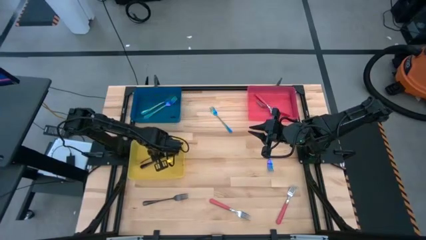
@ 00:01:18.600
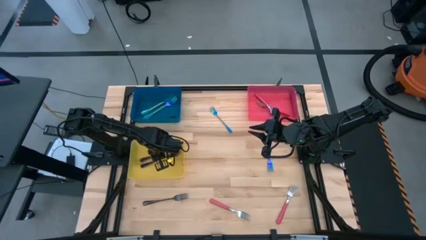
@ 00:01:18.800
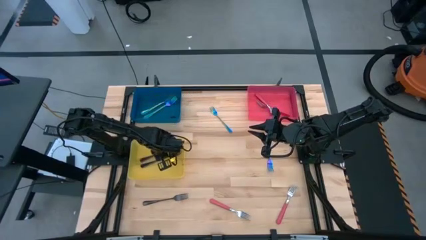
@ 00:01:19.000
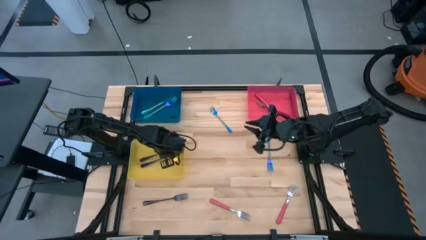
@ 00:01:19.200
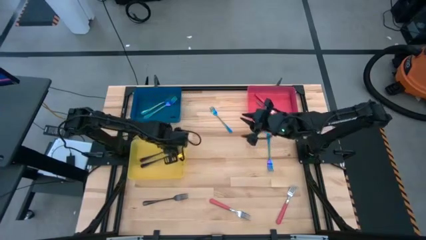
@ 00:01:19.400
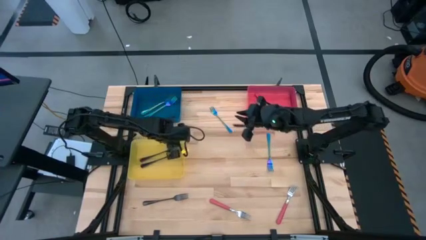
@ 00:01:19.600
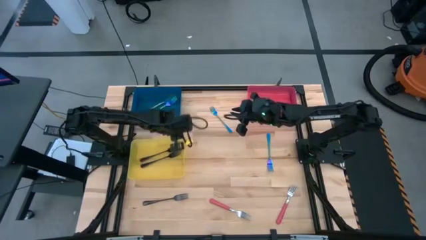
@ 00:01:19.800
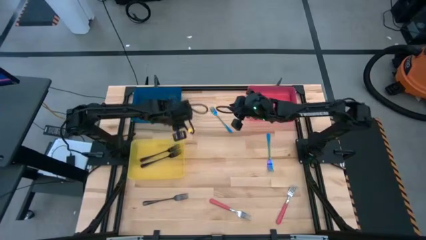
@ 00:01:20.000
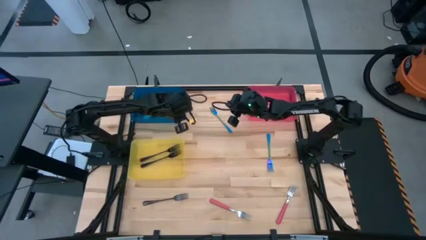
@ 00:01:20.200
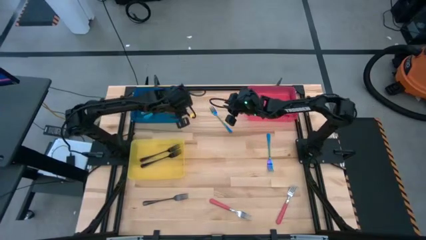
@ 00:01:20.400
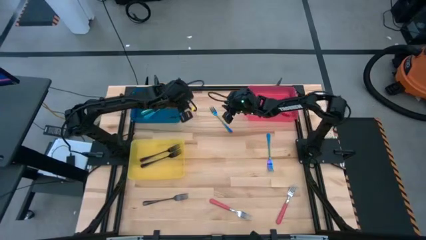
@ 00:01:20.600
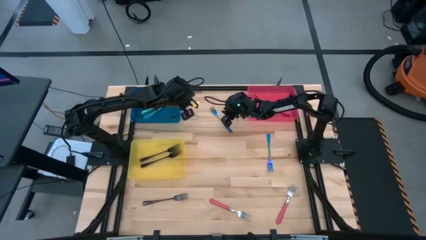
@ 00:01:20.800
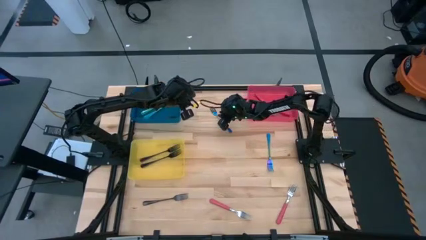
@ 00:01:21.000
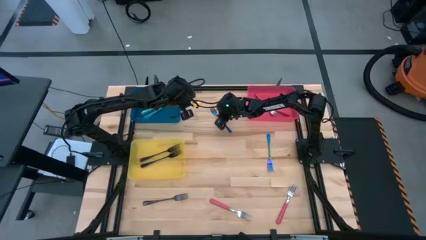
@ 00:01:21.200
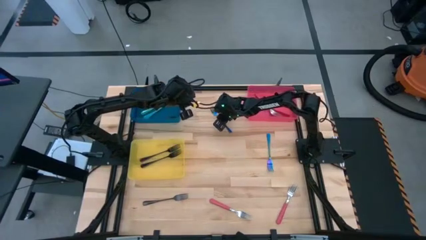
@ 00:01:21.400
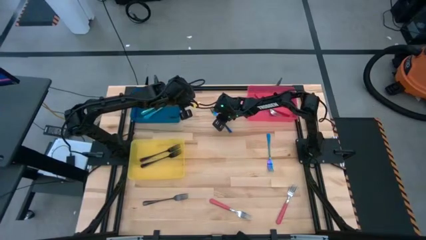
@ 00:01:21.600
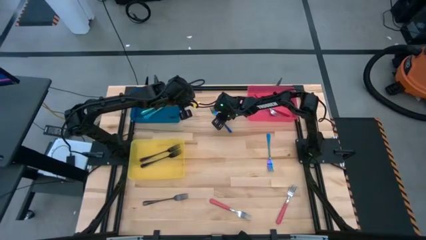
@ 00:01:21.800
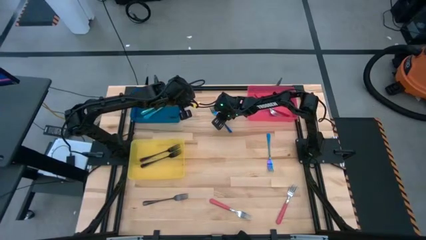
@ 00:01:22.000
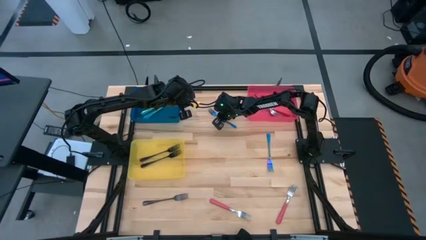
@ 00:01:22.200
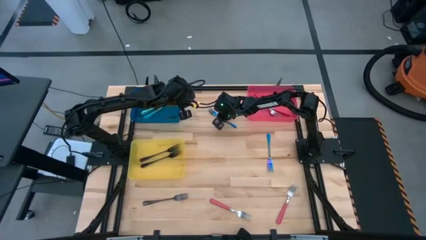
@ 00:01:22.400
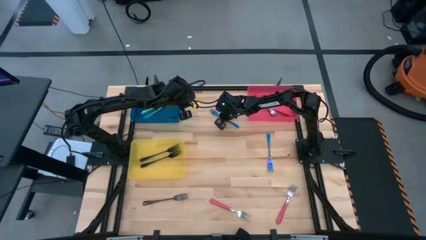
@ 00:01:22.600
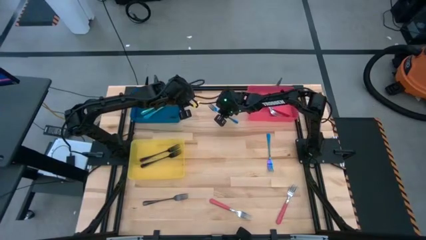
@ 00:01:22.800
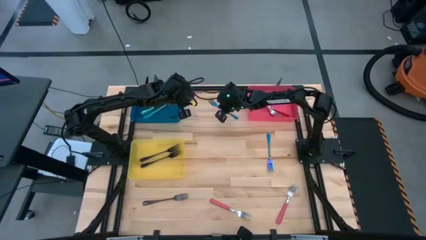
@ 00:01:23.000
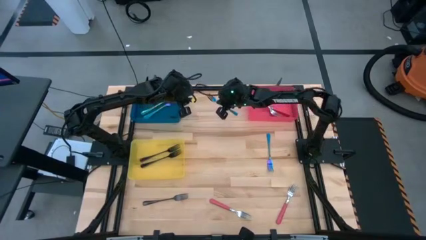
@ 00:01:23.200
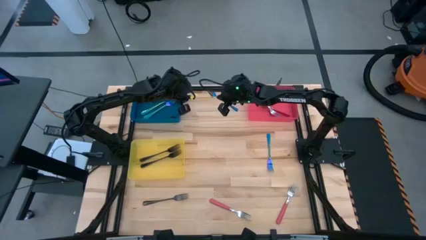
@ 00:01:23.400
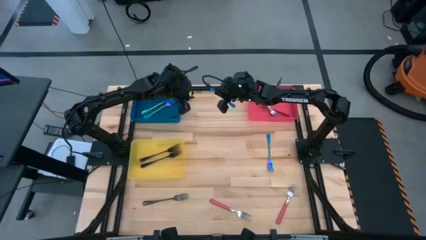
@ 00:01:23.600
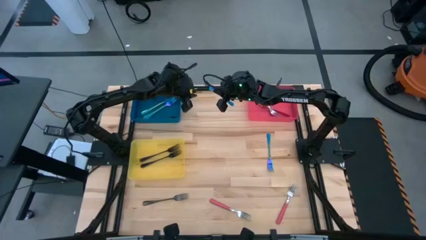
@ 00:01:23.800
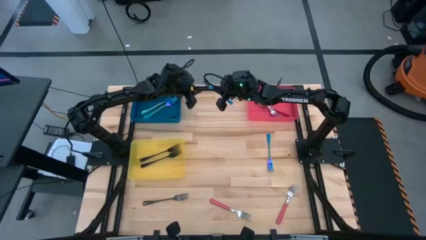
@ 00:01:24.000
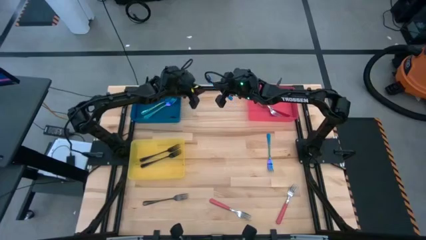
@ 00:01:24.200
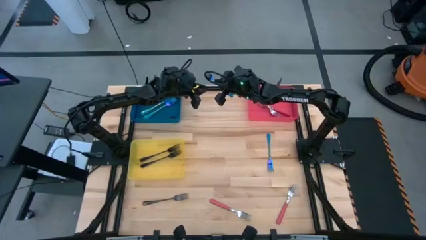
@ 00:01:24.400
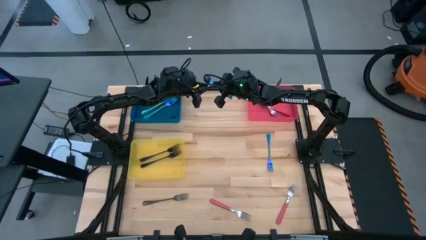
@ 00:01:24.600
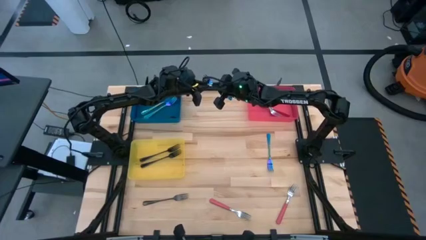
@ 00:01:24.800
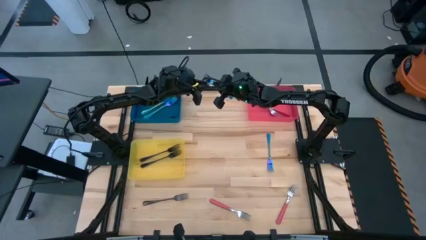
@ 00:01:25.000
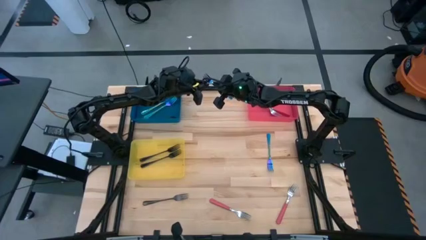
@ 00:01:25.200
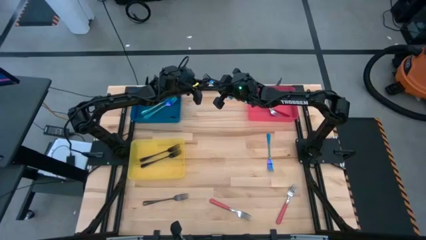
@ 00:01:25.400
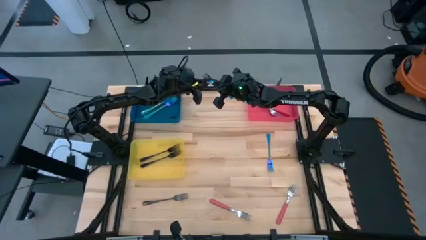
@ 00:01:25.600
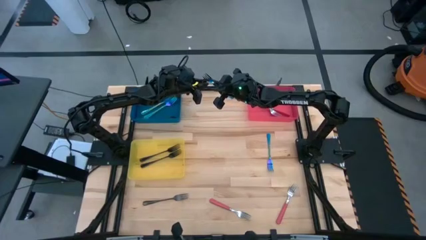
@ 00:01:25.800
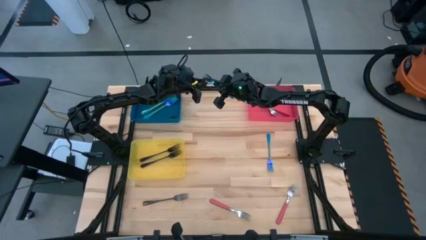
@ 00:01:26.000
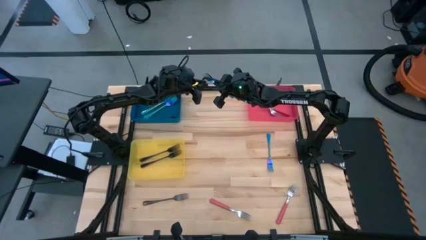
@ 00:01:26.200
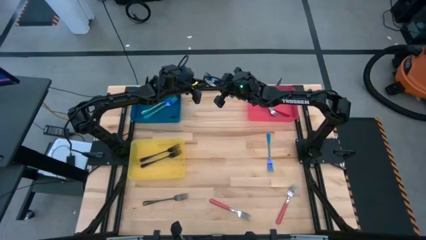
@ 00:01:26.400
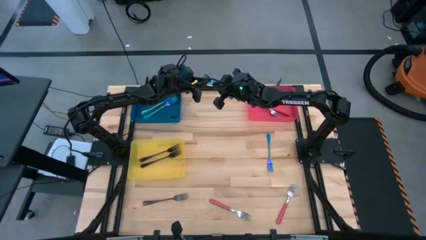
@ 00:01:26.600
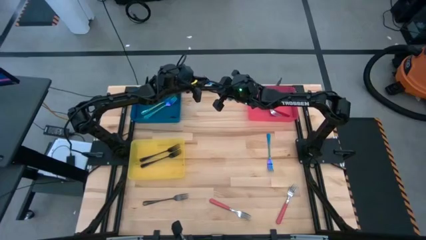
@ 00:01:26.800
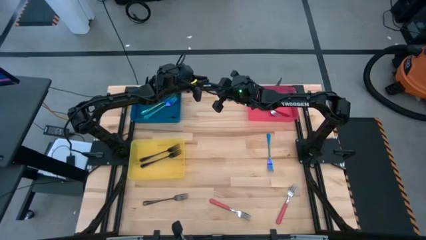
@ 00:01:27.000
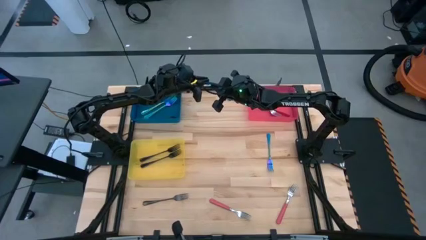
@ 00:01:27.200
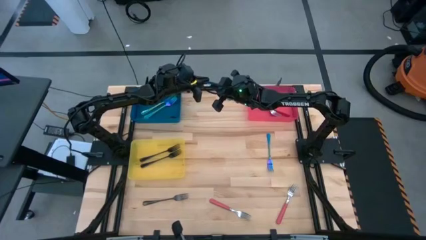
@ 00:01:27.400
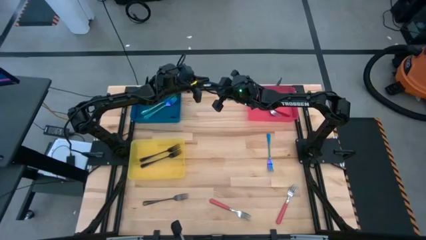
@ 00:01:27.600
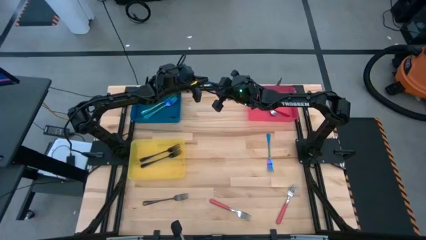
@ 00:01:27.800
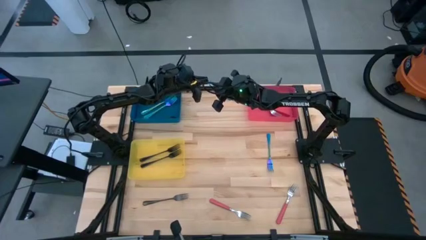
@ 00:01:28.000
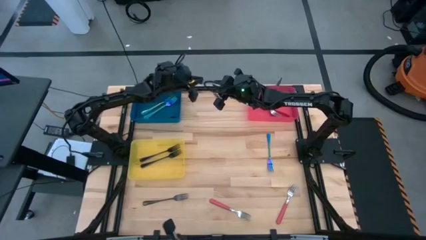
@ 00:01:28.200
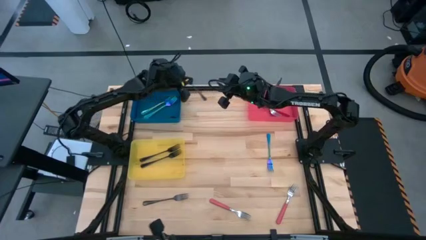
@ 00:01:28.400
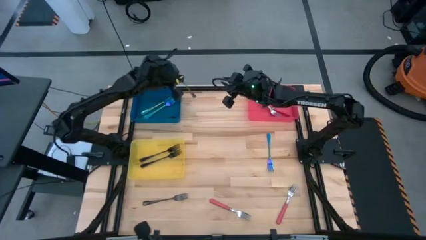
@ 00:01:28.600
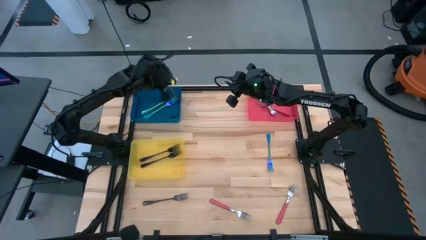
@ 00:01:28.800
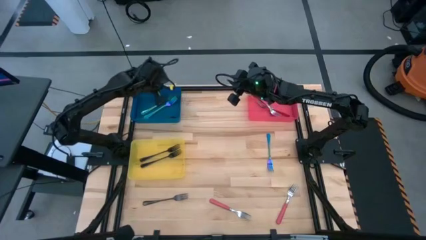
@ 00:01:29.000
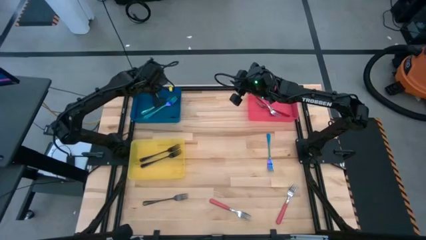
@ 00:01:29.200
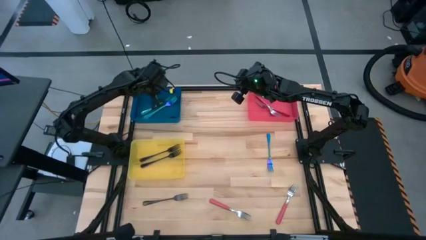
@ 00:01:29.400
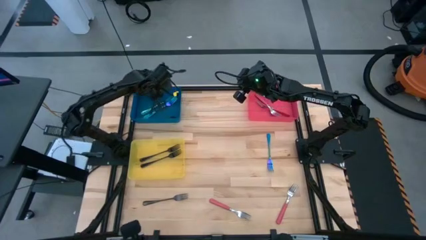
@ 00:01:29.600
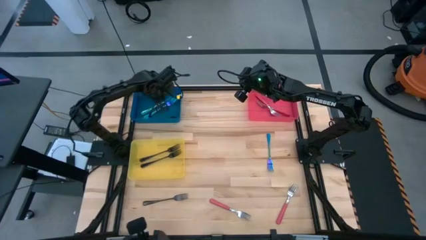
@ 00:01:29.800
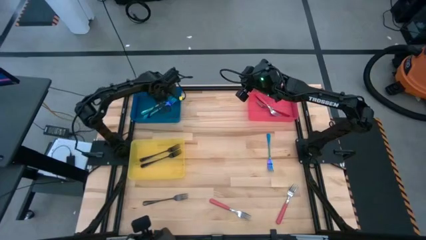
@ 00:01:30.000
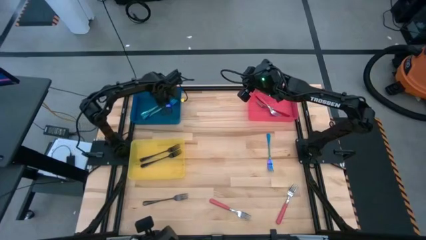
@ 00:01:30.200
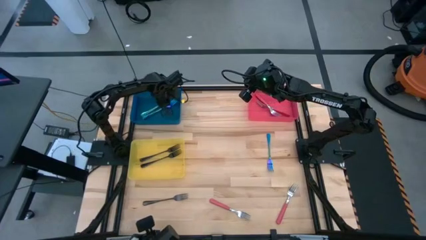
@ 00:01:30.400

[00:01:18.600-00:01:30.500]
Task: Sort silverware by color (type)
Put the blue fork into the blue bin
